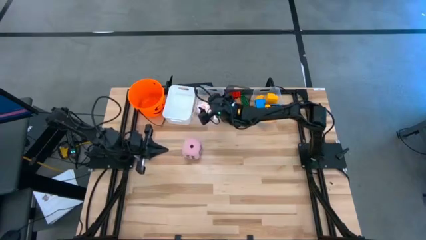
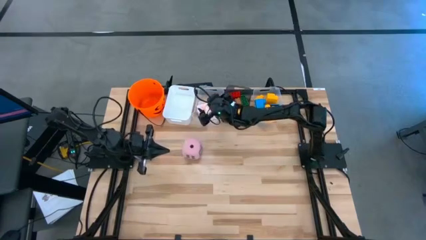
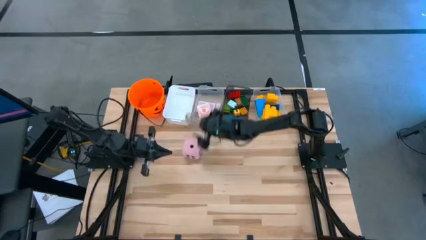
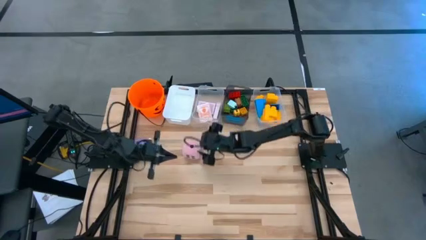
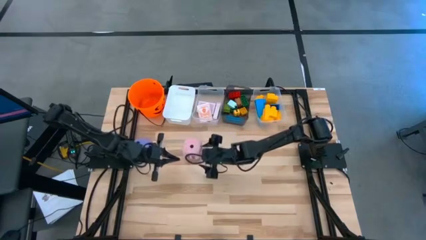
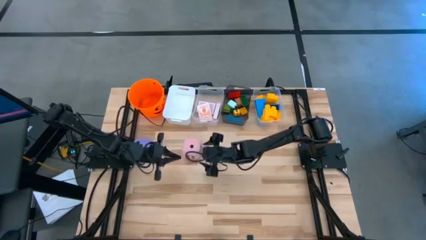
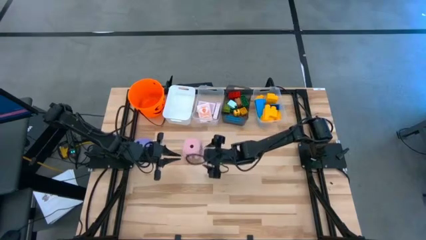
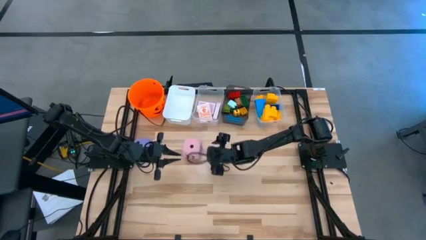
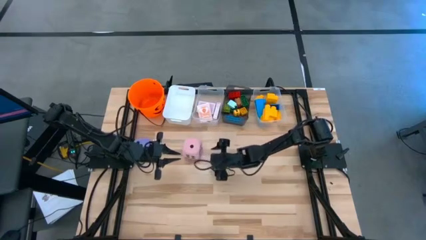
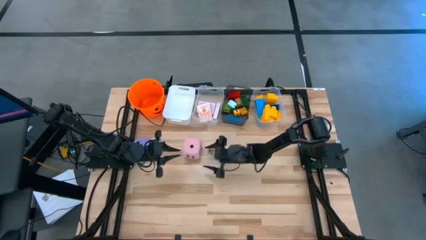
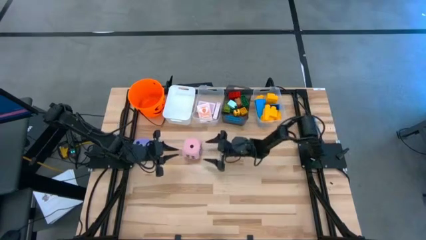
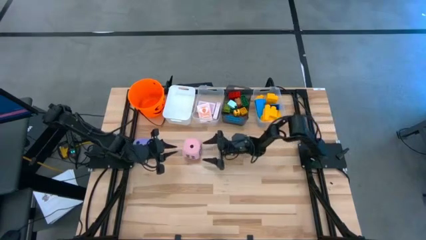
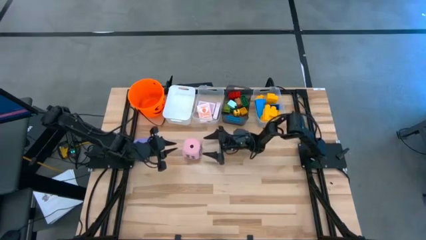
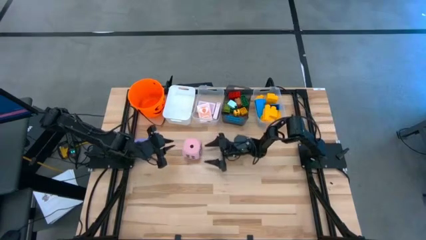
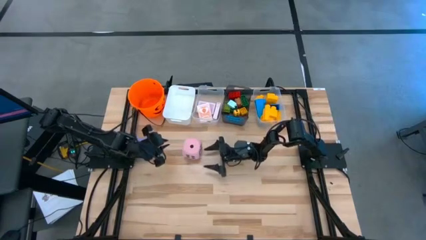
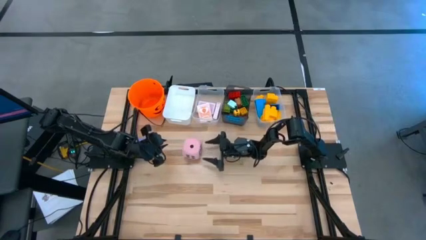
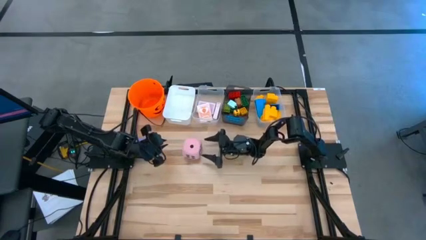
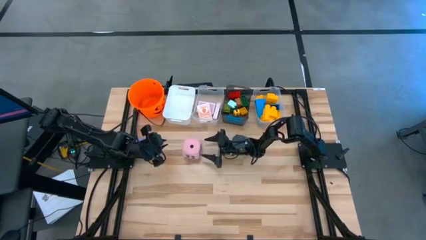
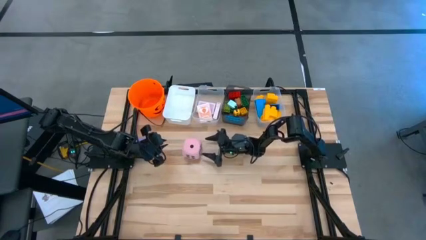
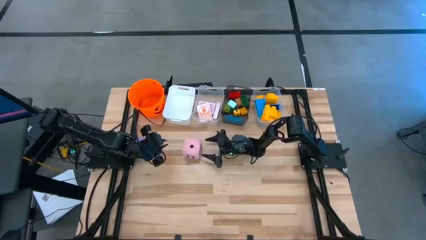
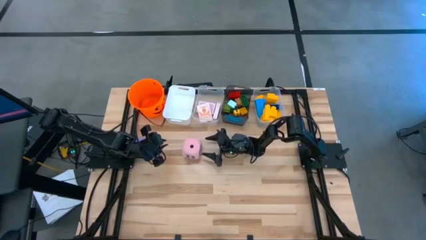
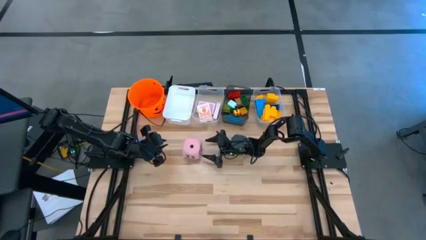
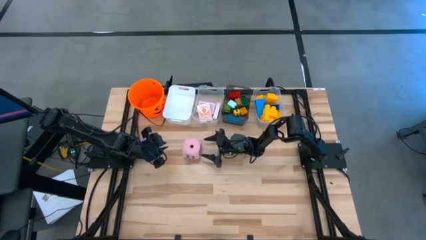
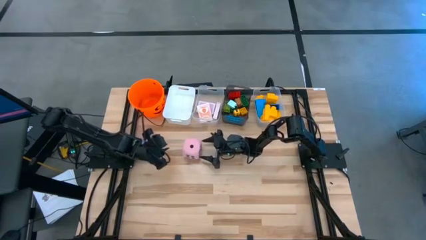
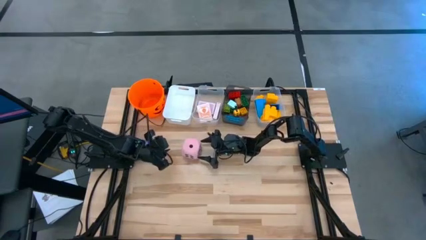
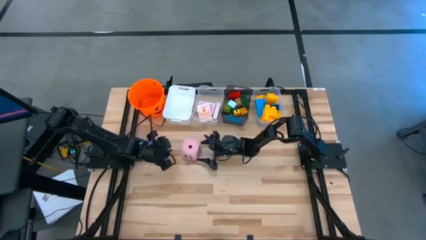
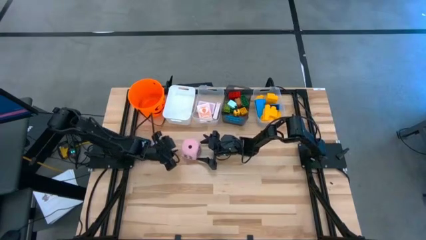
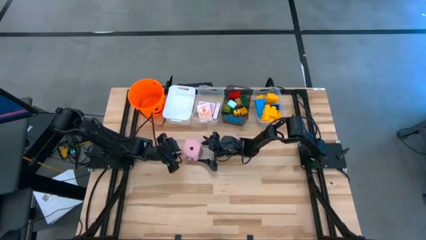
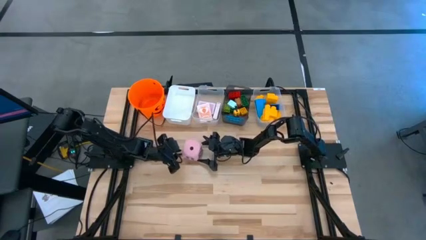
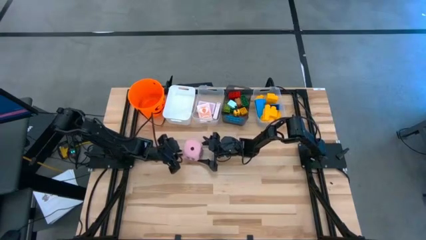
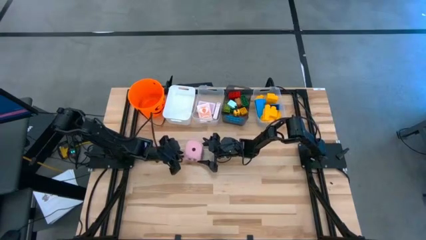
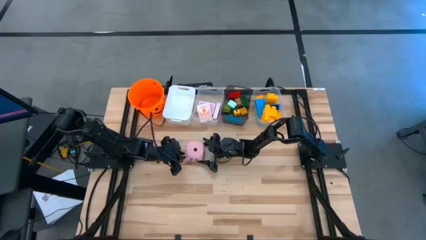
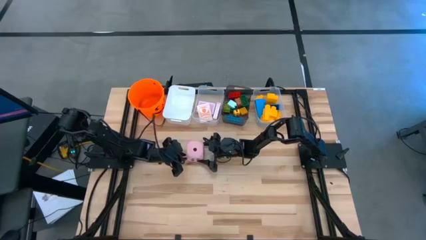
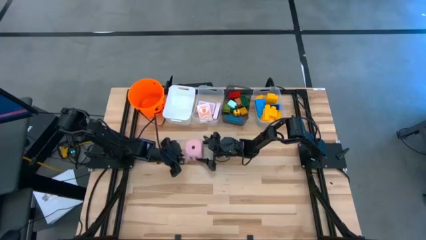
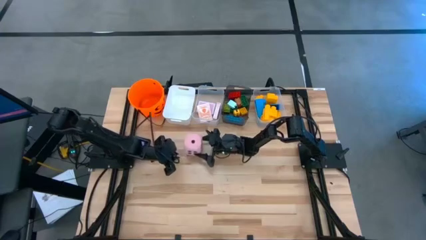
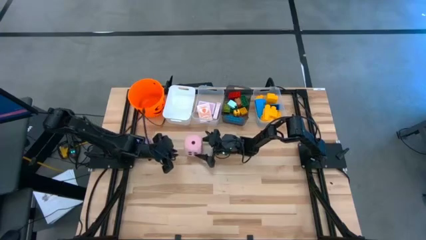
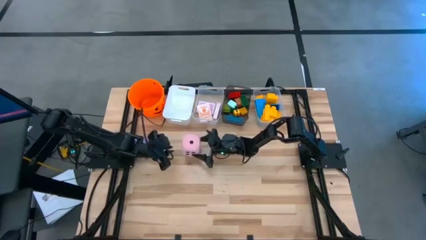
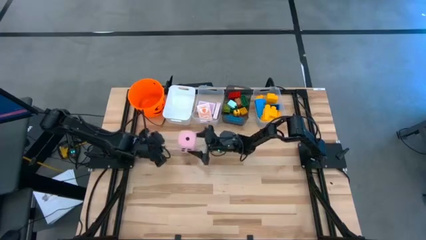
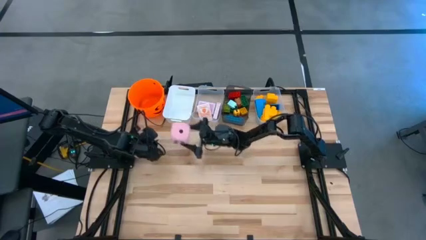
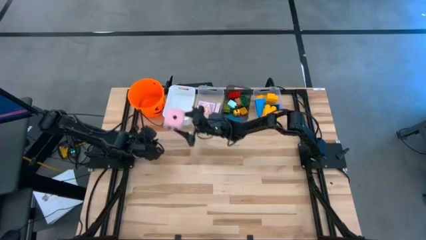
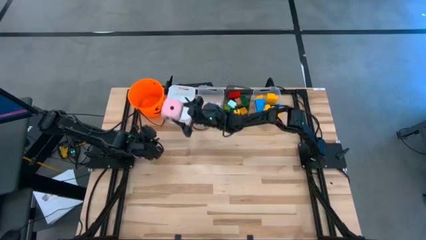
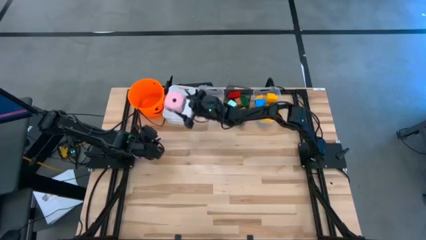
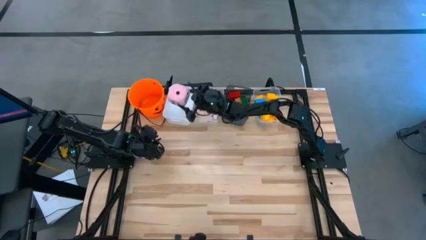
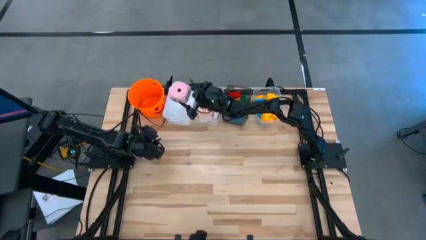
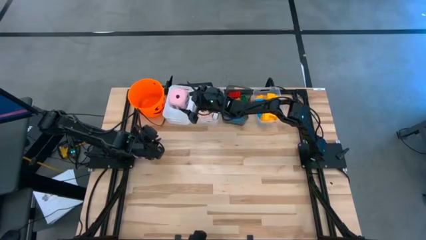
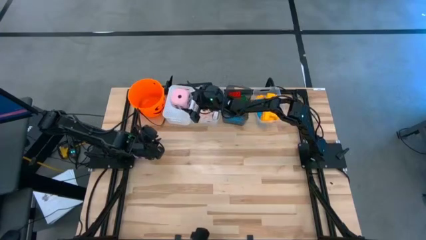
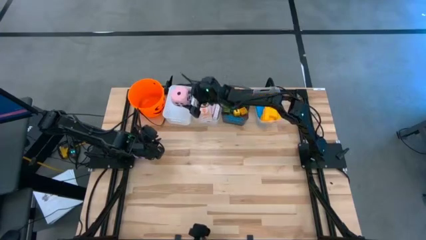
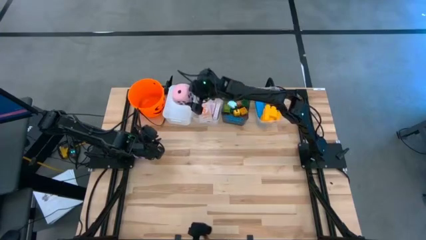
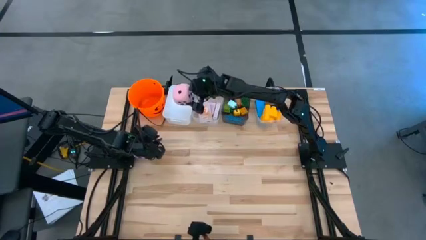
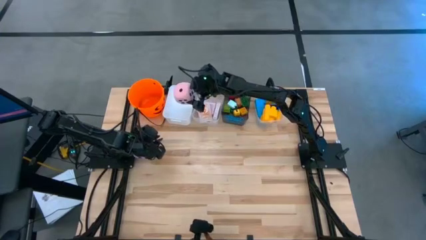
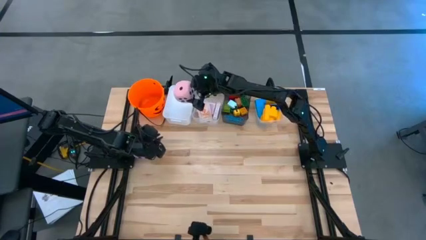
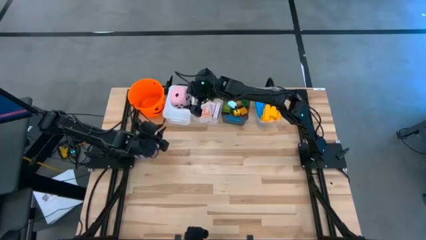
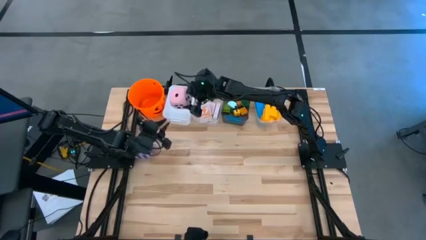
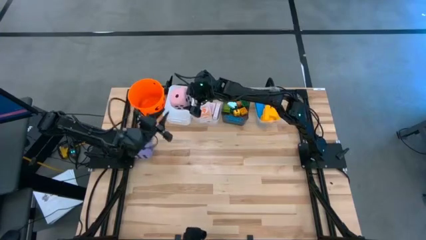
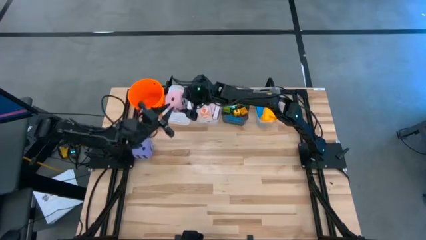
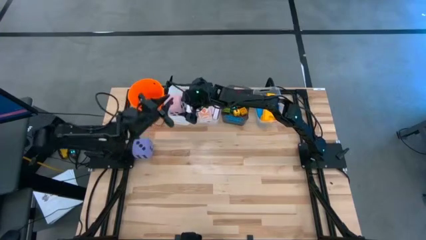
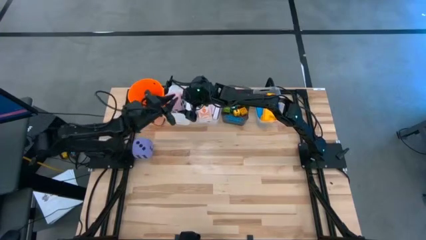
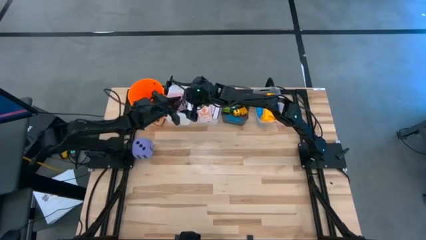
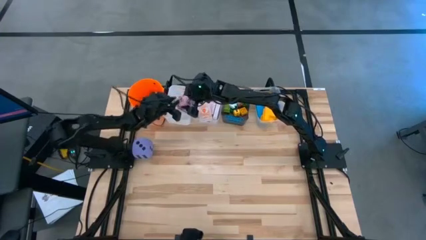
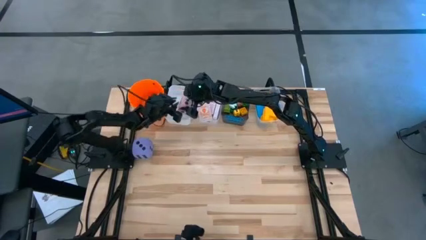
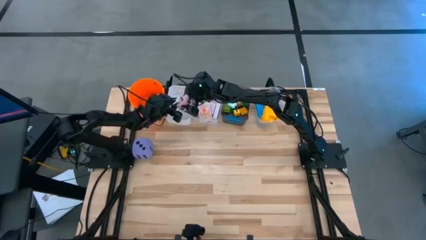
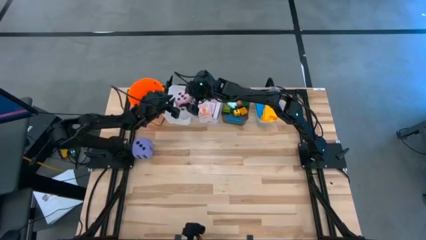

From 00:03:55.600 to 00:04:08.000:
Task: Pick & Place Toys
Put the pink die into the white bin
